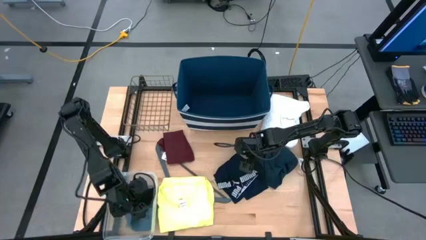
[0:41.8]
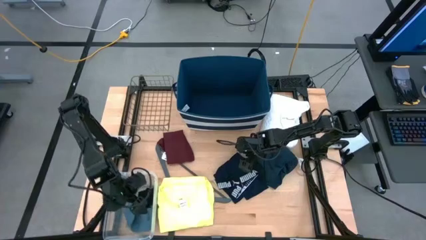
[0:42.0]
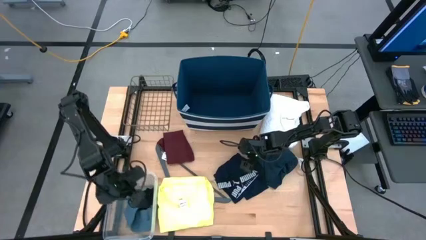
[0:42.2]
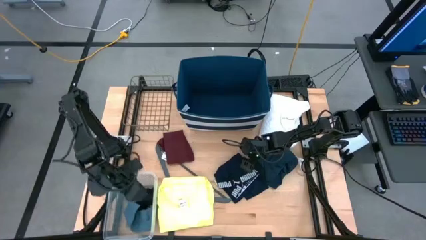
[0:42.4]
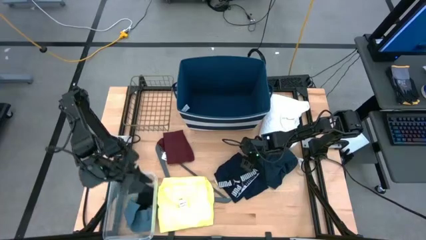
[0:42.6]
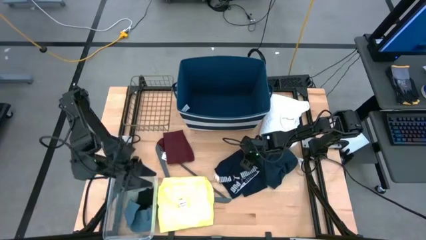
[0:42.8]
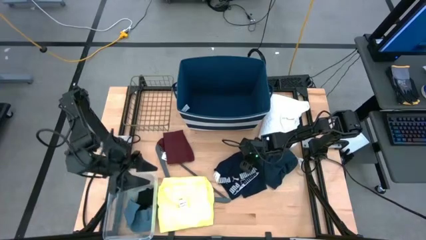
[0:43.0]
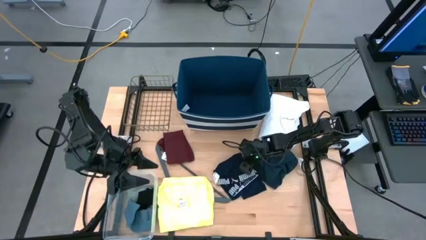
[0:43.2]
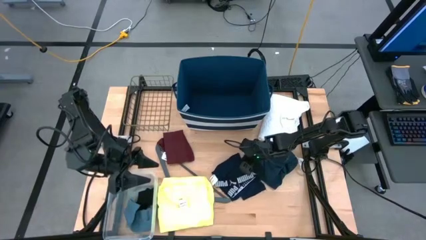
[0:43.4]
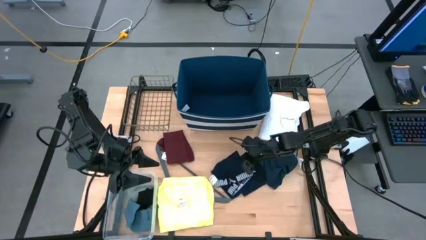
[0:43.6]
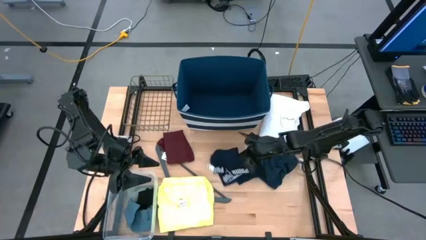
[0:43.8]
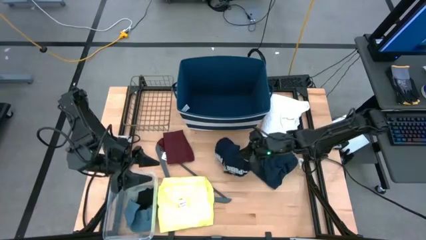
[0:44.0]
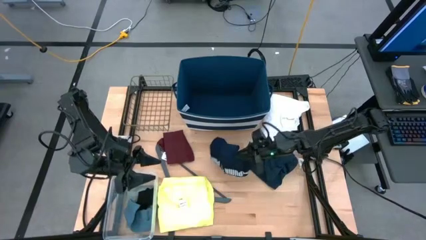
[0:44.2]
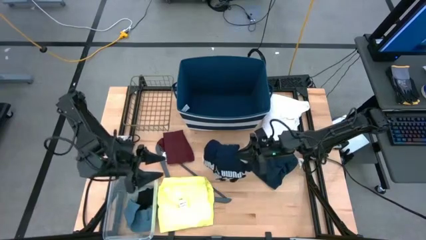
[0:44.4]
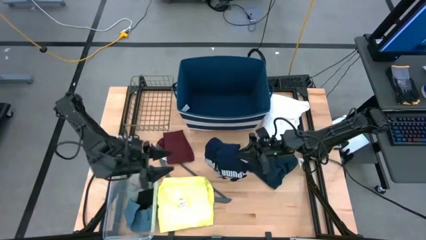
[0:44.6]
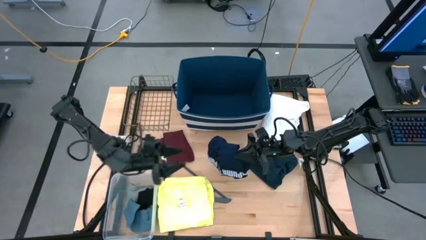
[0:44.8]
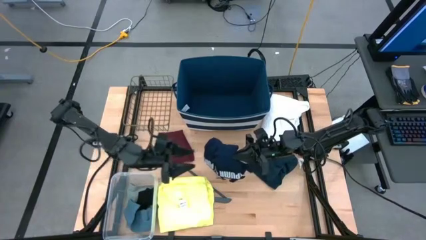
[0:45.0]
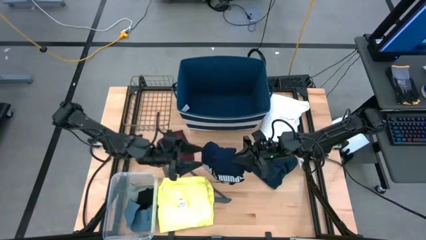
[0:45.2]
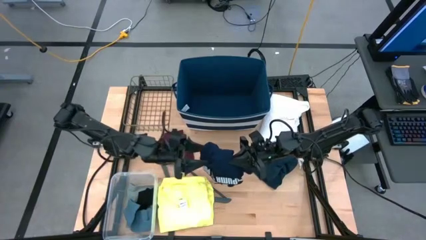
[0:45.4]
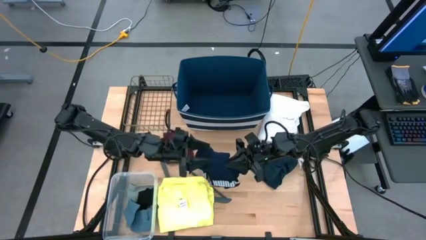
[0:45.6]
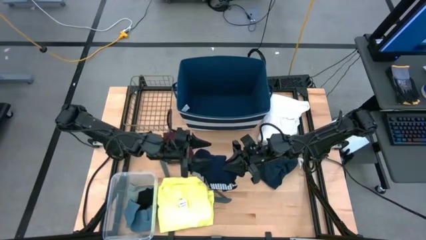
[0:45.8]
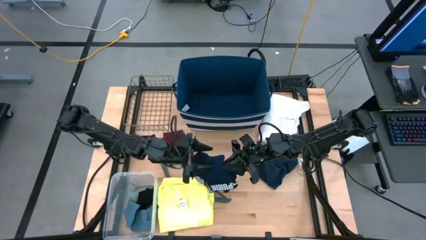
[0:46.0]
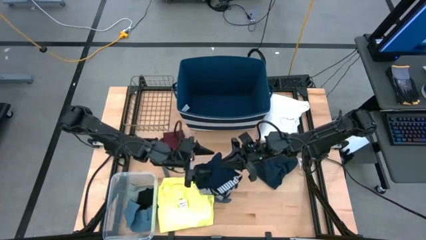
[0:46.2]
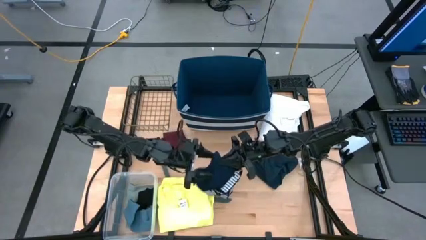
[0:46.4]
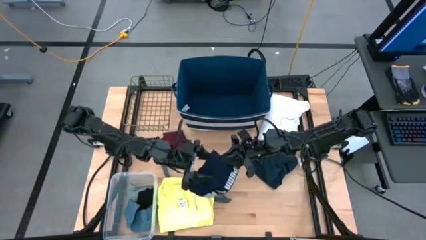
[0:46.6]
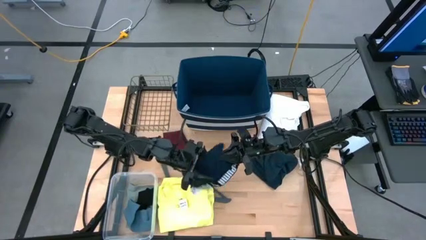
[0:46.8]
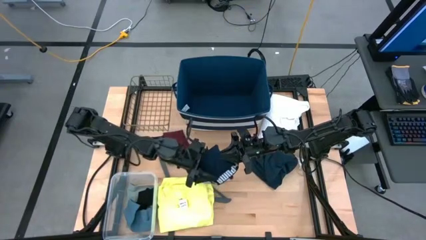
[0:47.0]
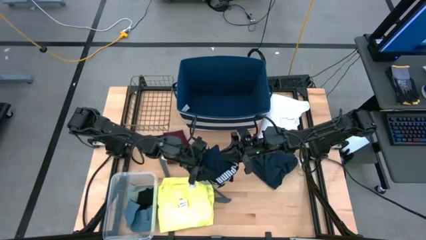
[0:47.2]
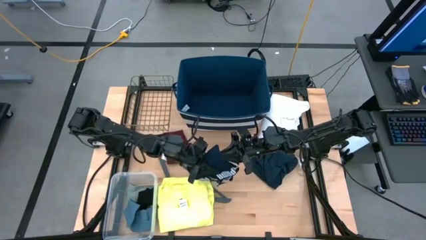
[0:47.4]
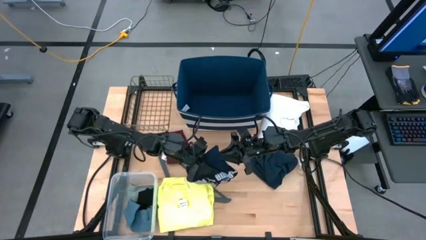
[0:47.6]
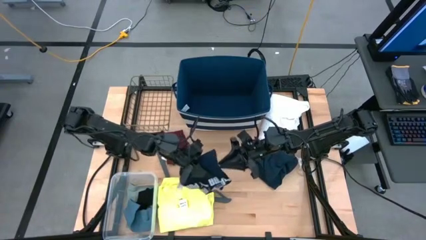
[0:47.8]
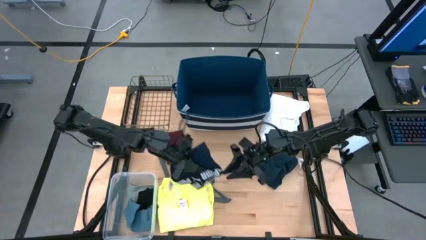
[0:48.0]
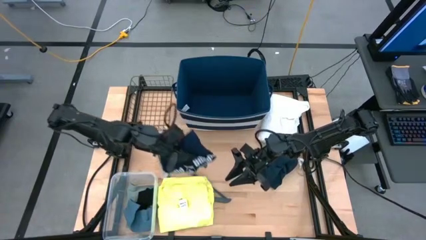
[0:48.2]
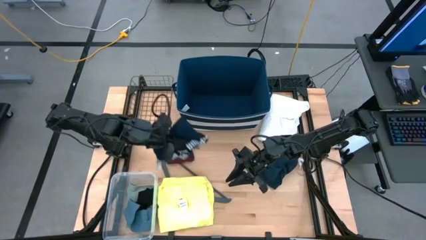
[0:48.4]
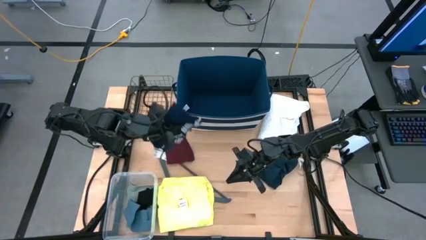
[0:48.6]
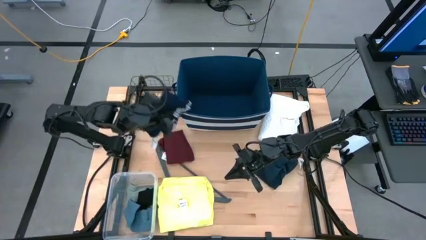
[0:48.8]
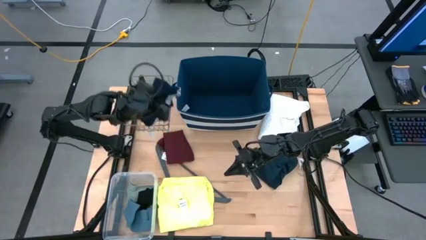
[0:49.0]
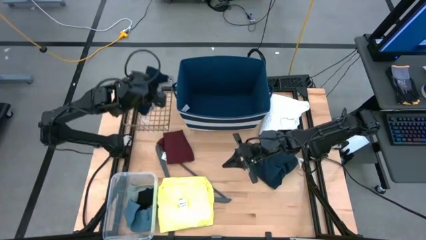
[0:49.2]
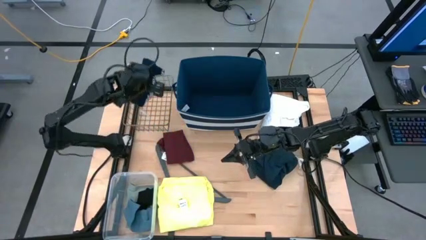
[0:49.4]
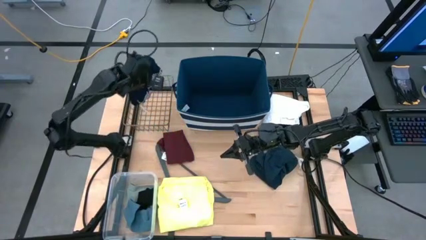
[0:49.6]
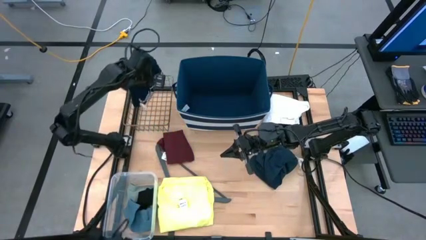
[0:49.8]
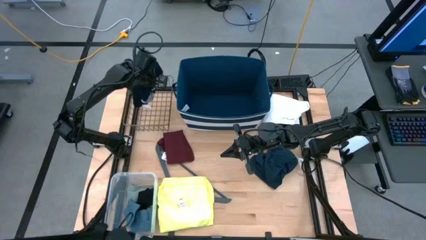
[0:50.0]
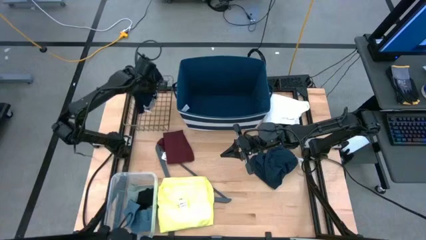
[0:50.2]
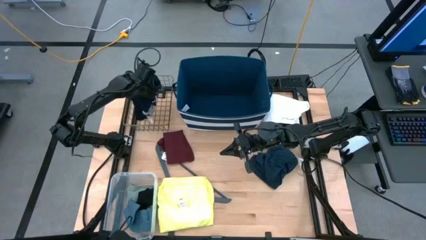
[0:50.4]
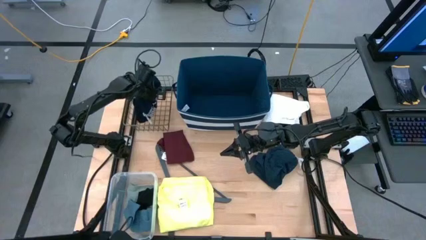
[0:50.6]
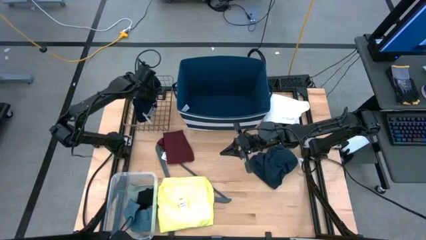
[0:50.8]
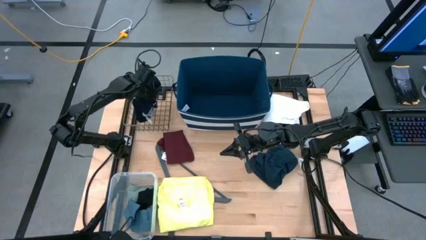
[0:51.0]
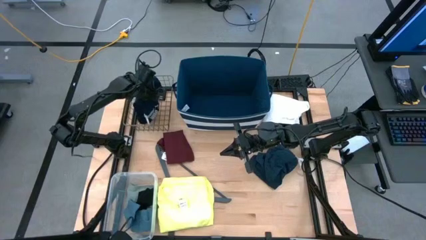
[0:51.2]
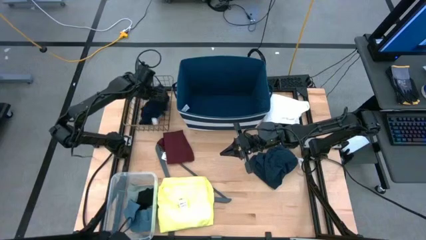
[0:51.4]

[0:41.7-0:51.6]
Task: Pick & Place Cloths
Put the dark blue shorts into the wire basket

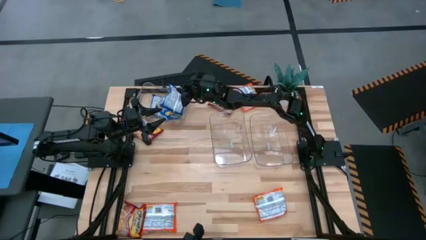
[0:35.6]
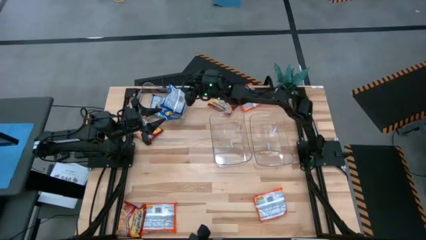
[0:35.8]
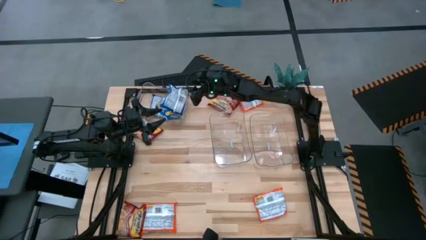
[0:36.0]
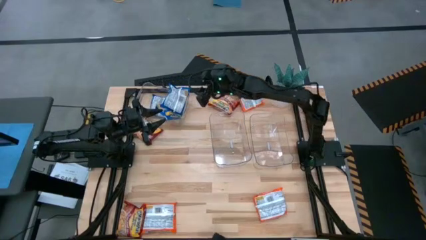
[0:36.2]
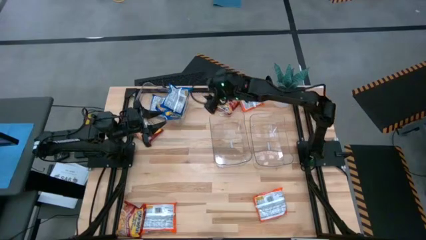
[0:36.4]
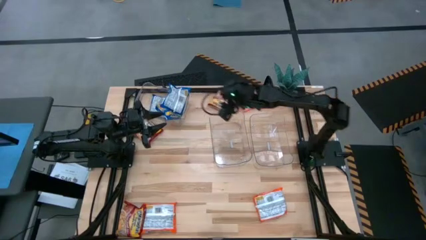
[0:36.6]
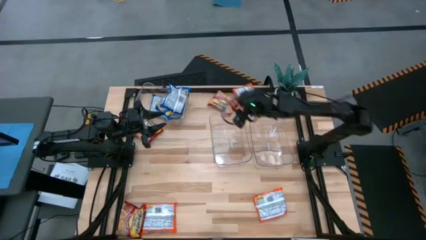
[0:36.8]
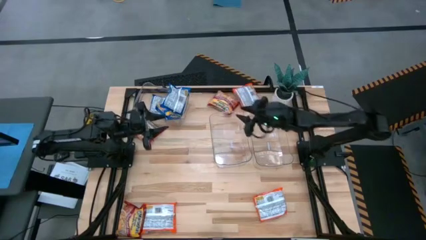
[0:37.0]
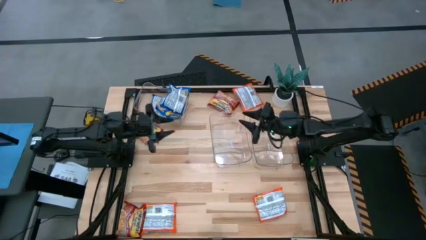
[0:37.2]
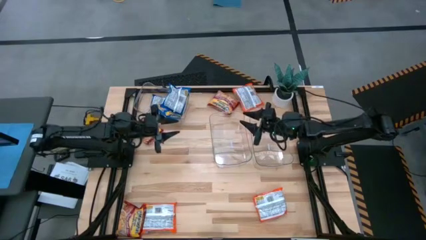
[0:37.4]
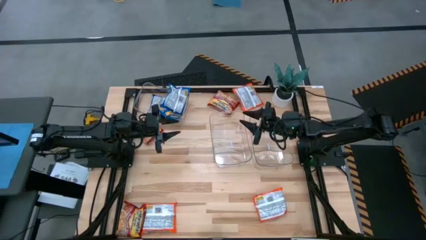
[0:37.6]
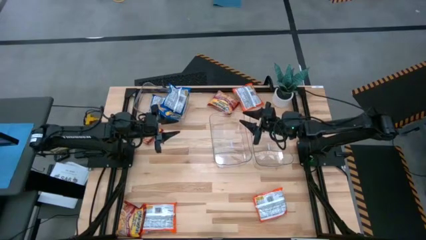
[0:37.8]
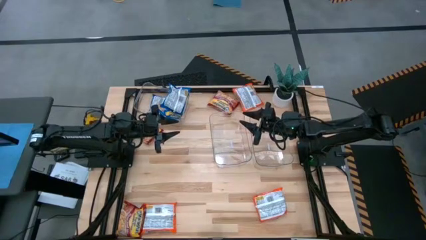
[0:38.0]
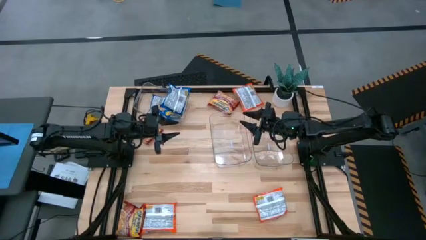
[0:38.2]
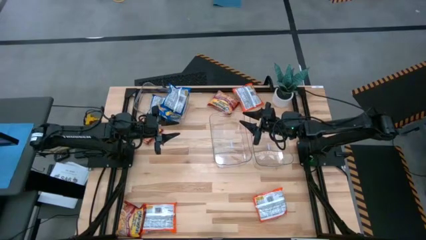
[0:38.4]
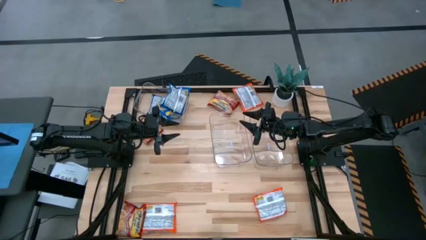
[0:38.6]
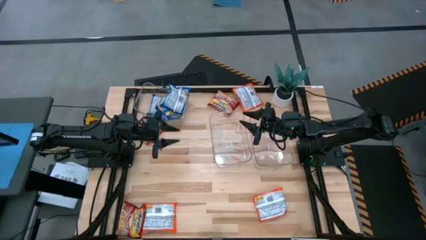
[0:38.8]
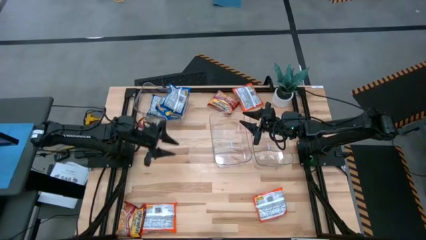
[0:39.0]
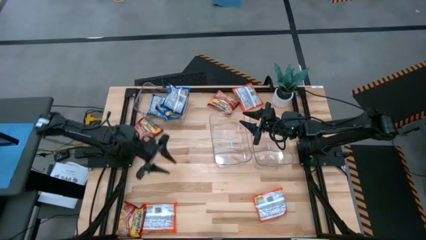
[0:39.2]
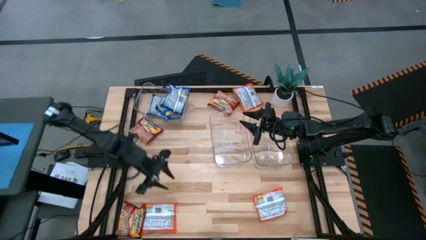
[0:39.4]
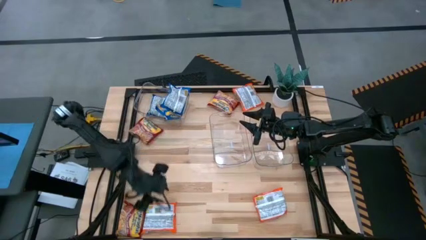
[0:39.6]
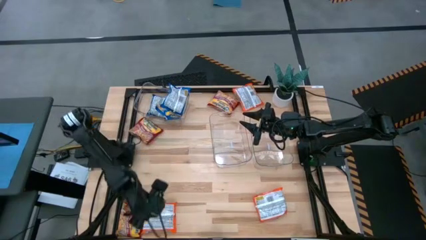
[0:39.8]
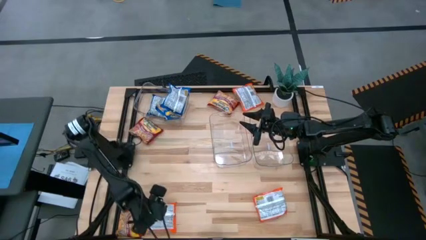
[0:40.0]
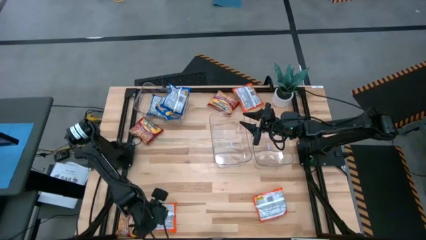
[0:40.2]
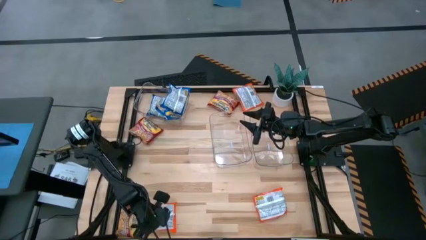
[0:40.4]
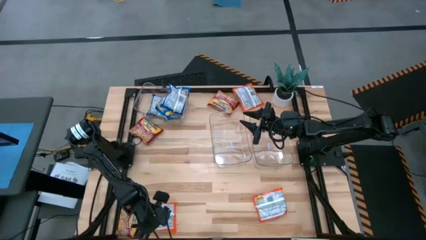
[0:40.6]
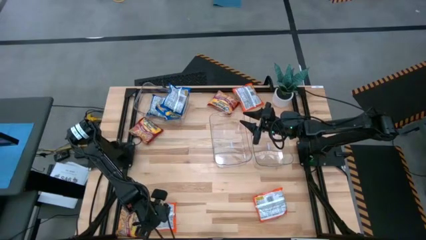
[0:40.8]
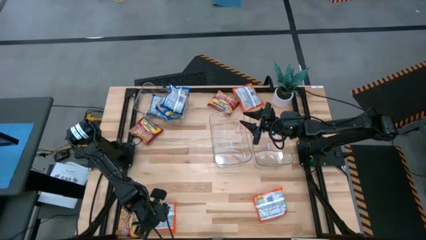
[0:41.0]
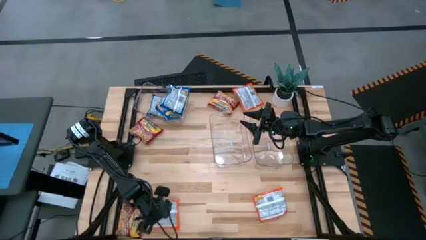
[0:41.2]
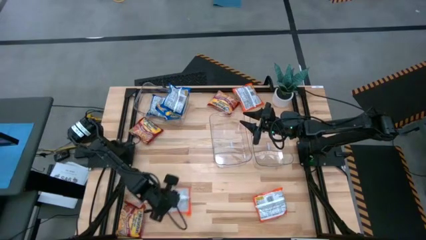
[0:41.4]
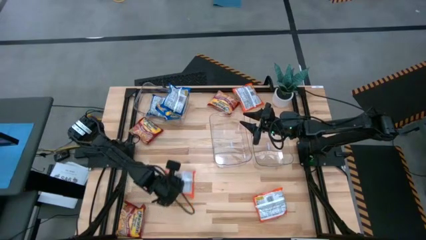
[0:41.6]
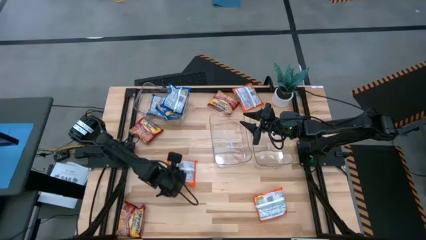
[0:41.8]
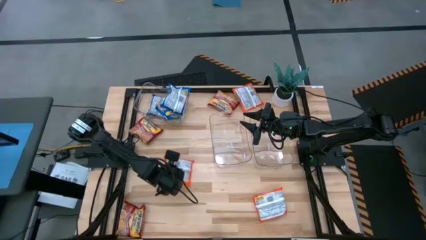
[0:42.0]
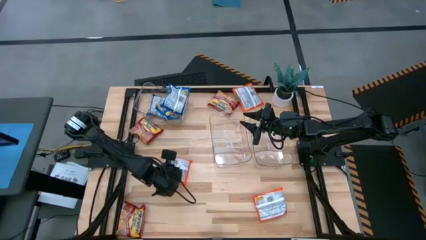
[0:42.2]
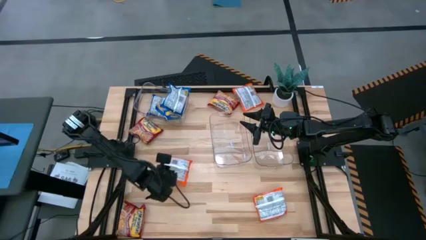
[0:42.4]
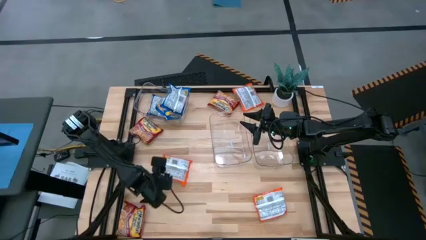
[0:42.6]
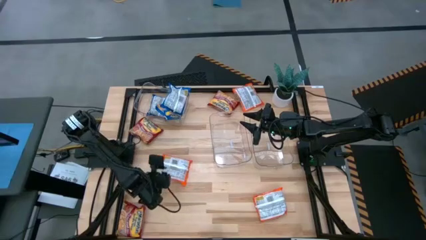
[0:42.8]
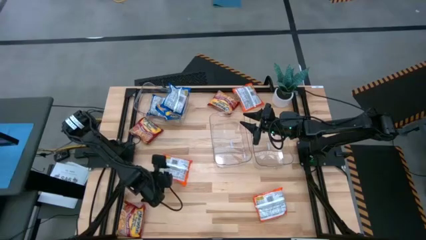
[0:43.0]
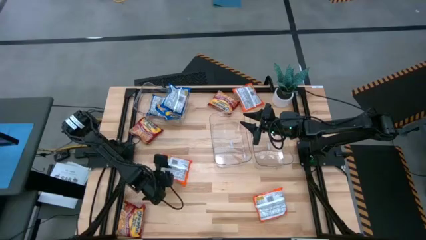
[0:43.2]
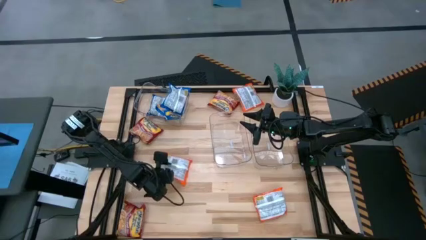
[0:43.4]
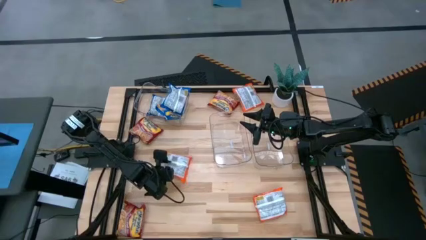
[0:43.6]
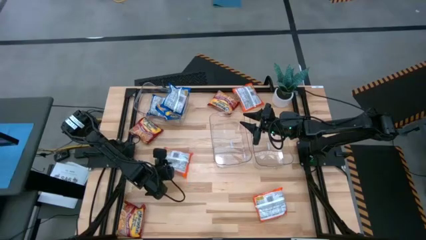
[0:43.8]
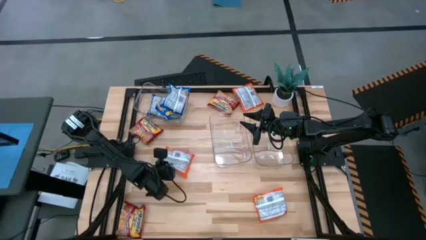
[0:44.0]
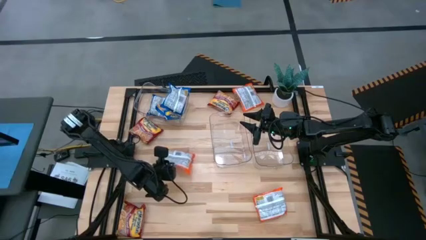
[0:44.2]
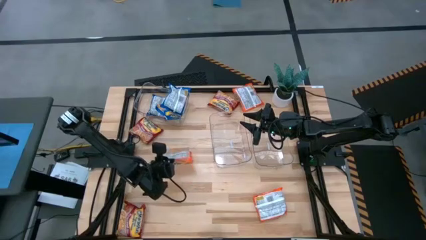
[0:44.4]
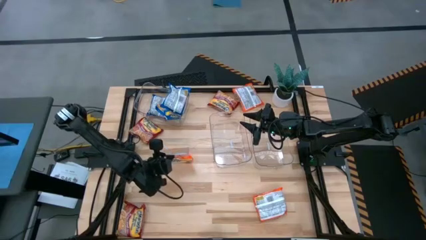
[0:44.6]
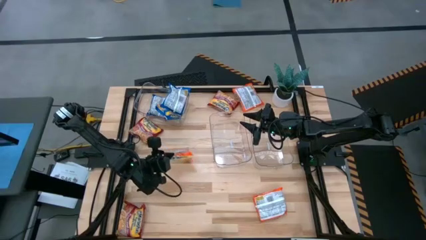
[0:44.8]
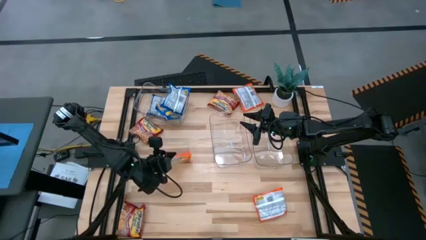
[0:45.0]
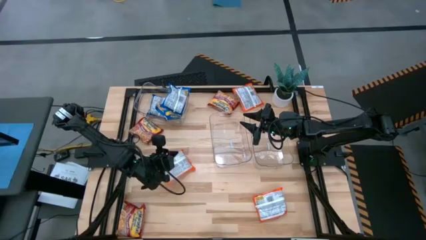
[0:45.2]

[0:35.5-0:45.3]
Task: Sort Maruchan noodles
Put the bottom left orange noodle pack into the bottom center transparent bin
